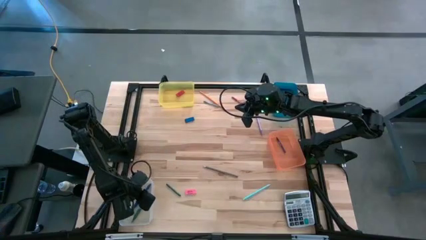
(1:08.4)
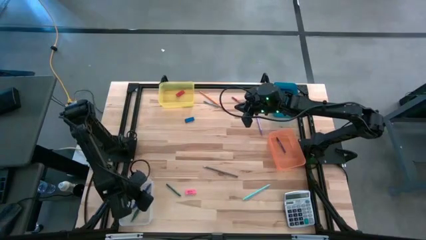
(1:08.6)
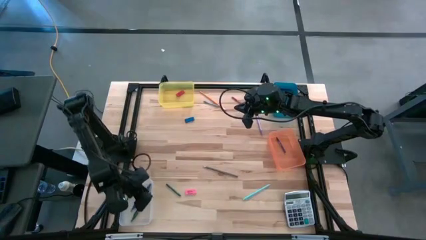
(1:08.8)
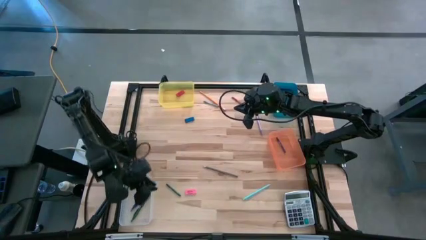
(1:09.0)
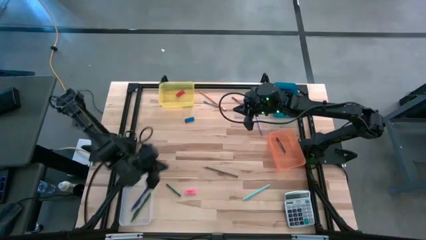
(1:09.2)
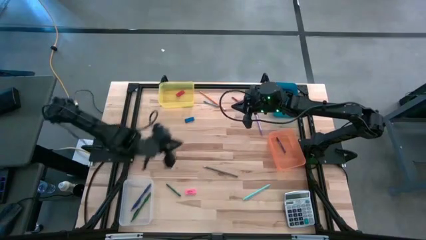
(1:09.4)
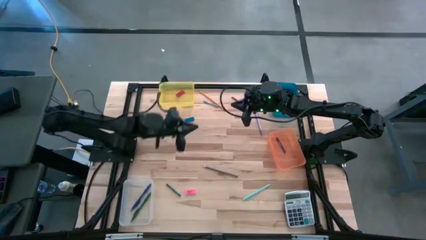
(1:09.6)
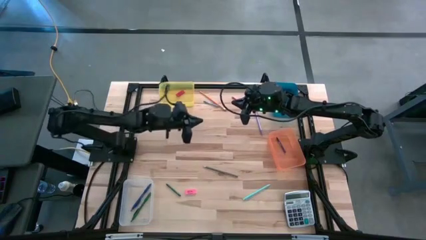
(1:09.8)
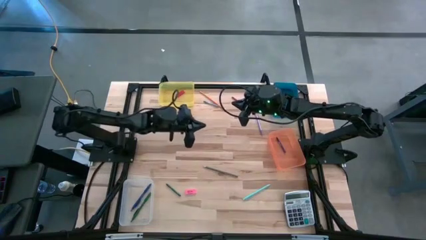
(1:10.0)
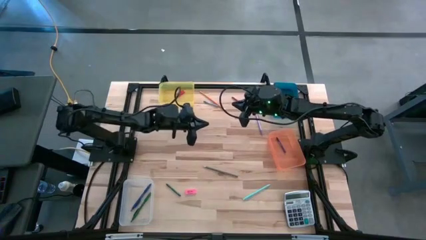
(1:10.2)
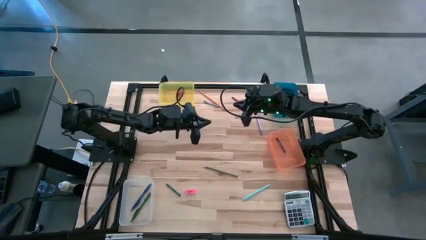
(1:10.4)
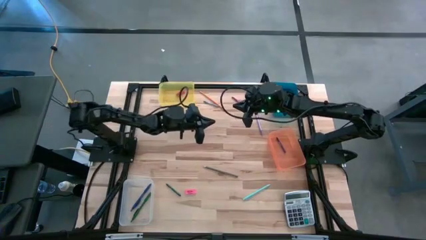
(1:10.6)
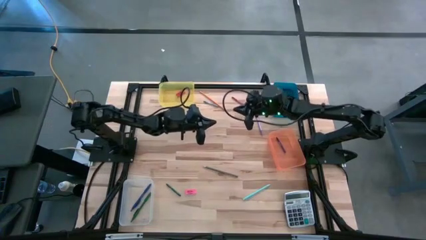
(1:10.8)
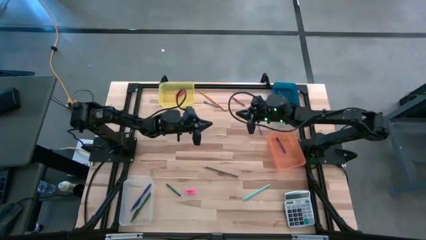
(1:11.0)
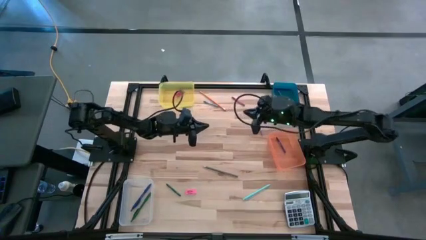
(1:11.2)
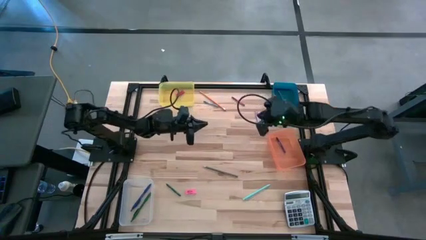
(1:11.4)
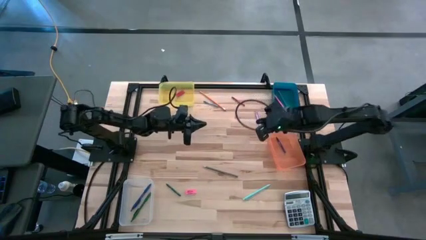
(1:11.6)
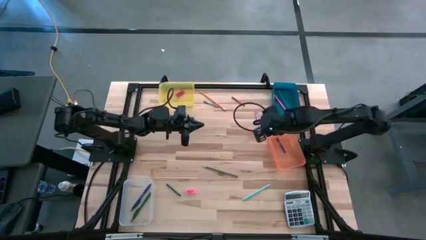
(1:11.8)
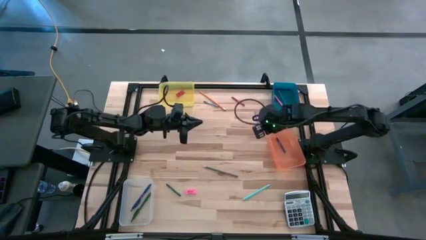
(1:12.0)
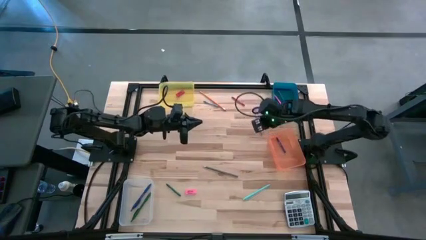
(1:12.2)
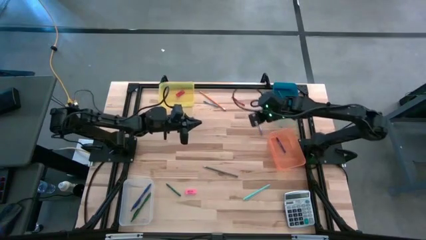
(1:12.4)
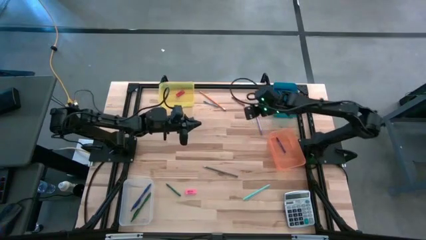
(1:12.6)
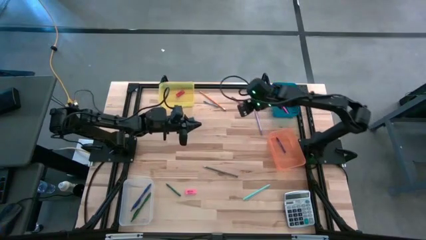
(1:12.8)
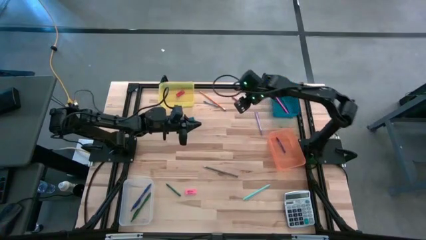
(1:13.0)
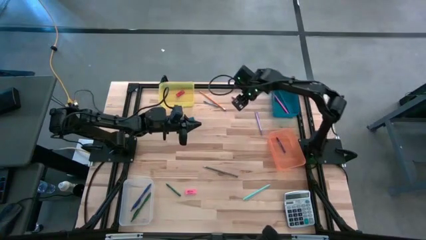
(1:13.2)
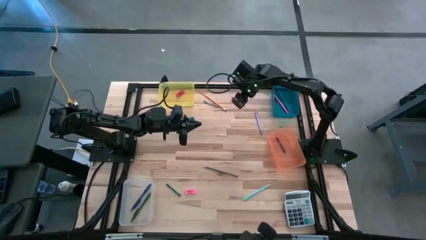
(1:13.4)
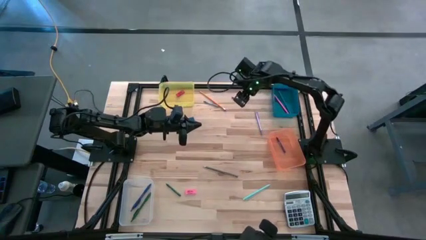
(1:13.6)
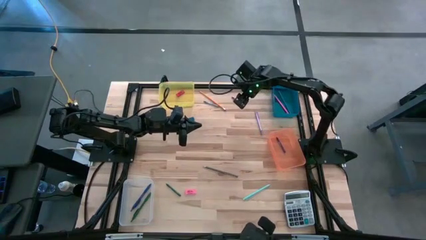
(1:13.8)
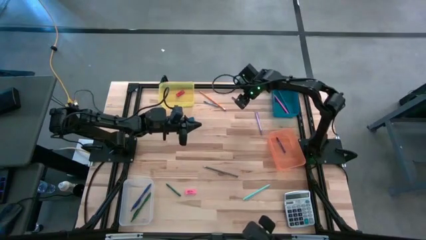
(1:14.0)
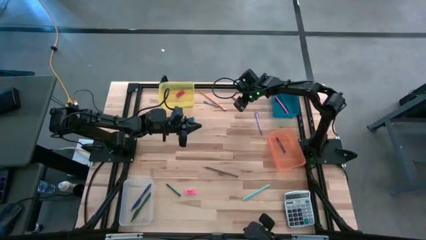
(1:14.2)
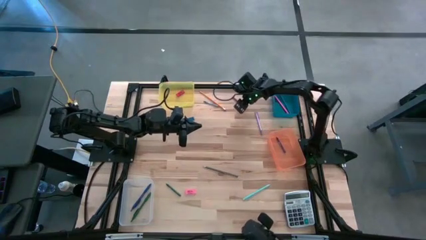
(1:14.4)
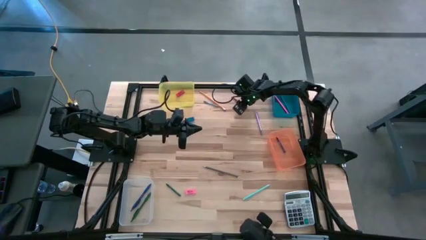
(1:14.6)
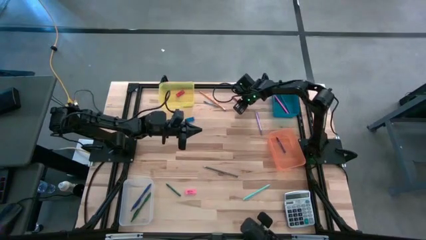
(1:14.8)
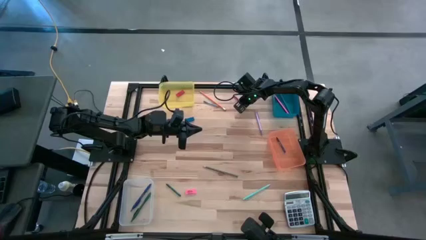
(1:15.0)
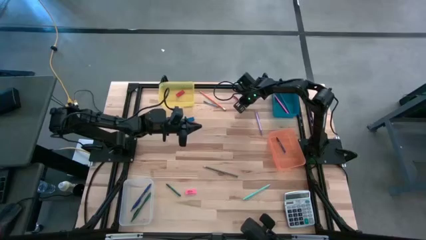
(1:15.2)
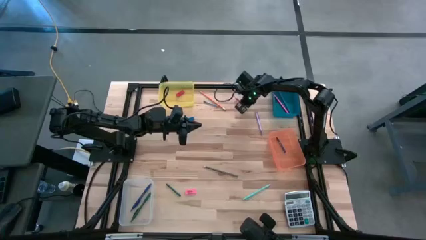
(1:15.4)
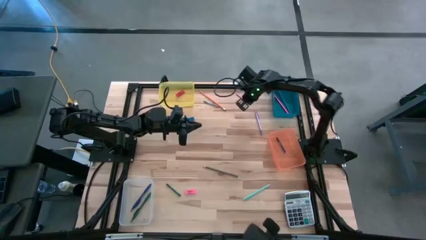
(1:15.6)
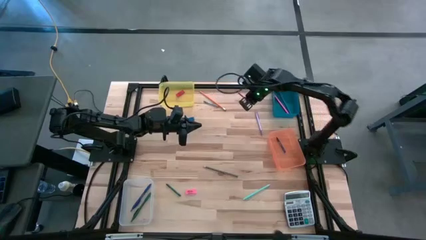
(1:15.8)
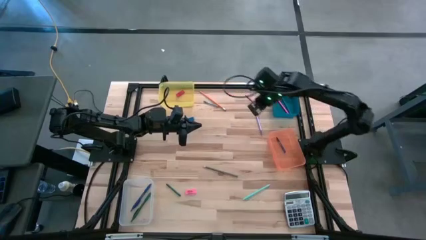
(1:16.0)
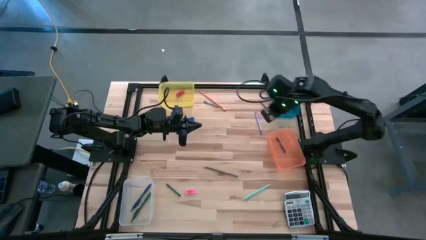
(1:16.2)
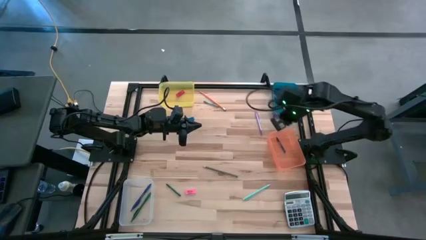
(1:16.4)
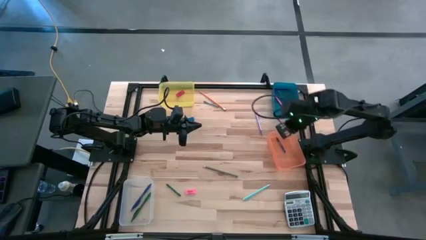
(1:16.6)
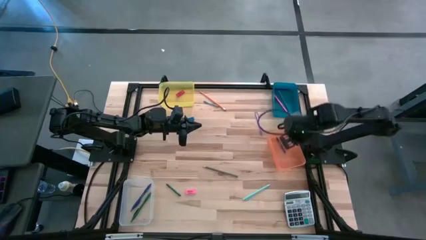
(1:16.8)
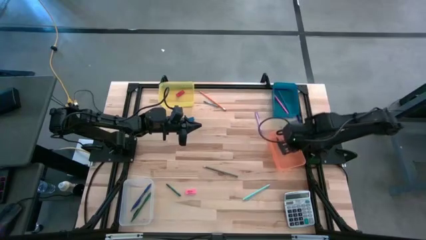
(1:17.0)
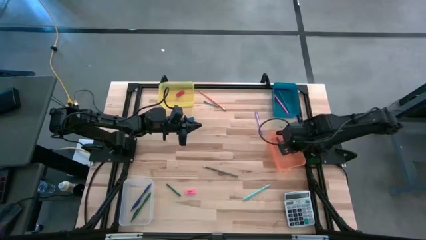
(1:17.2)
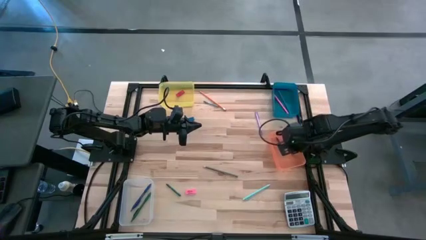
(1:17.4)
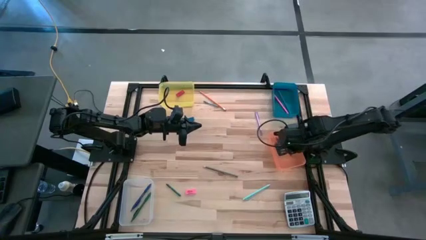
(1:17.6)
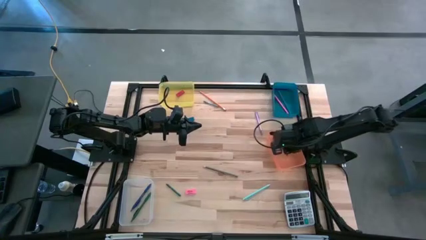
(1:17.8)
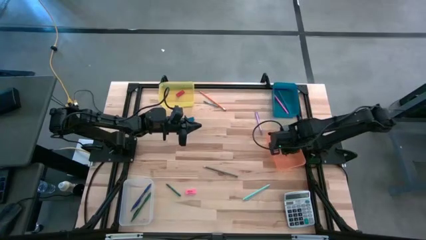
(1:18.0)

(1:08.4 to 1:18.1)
Task: Sort crayons/erasers/pens/pencils in bins
Put the red crayon into the orange bin

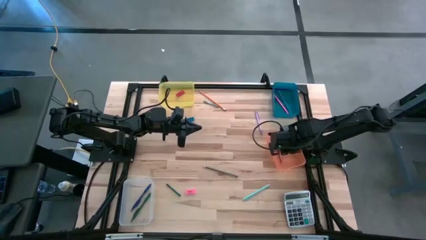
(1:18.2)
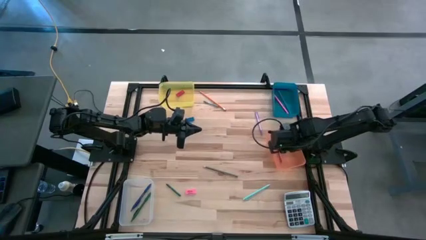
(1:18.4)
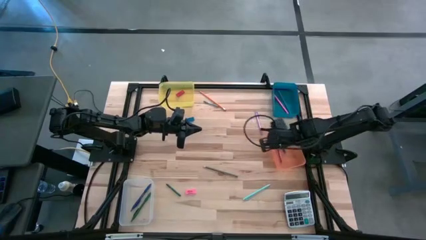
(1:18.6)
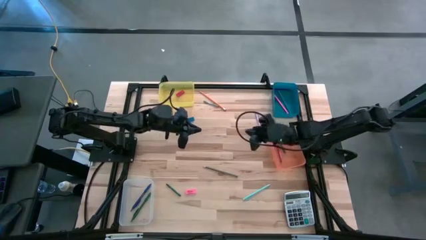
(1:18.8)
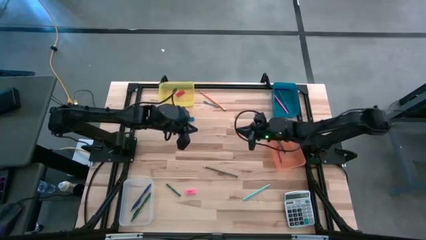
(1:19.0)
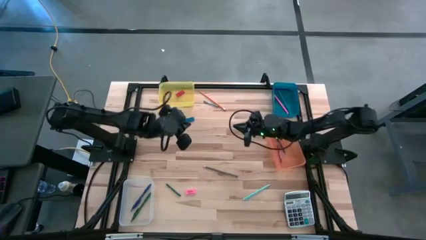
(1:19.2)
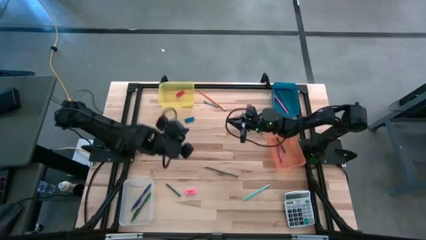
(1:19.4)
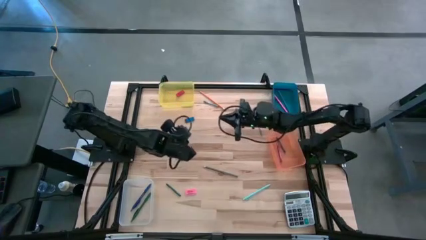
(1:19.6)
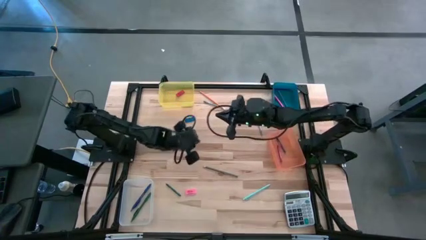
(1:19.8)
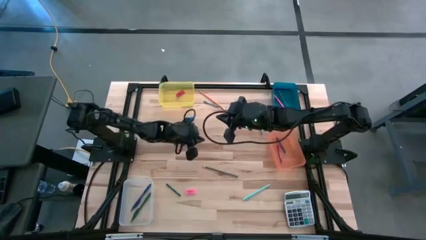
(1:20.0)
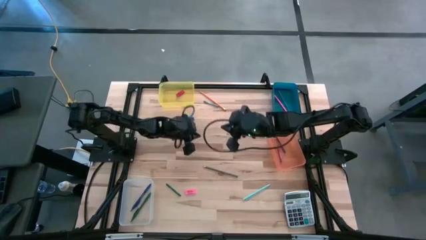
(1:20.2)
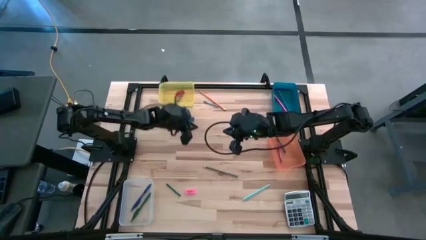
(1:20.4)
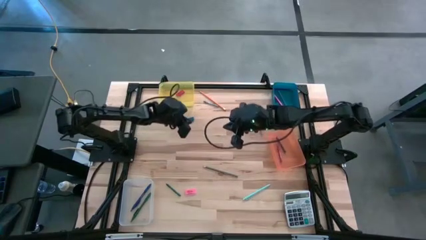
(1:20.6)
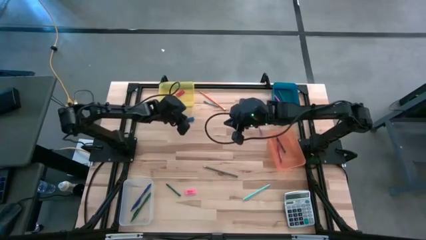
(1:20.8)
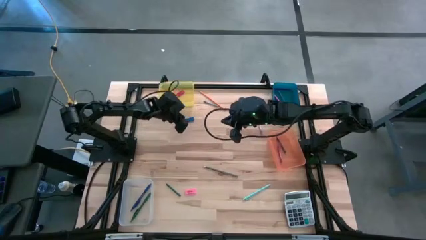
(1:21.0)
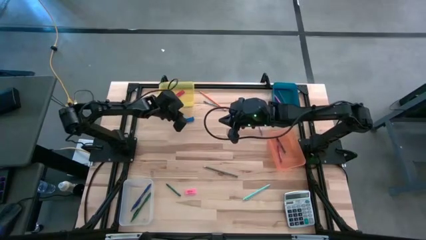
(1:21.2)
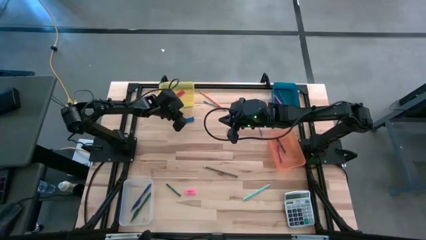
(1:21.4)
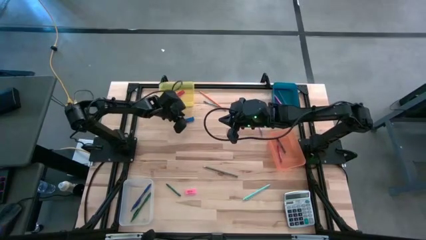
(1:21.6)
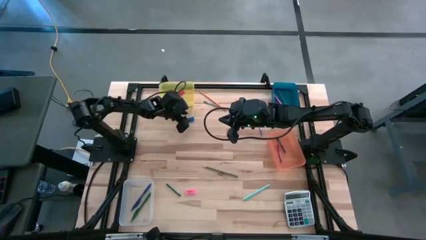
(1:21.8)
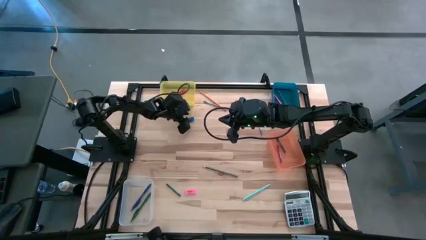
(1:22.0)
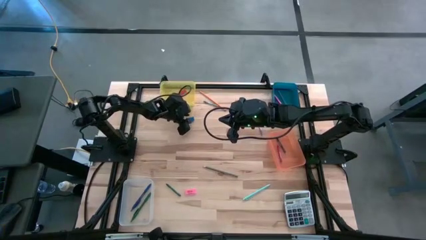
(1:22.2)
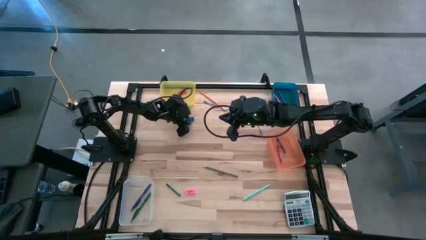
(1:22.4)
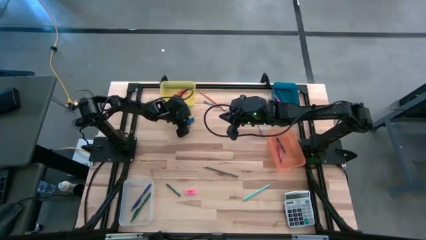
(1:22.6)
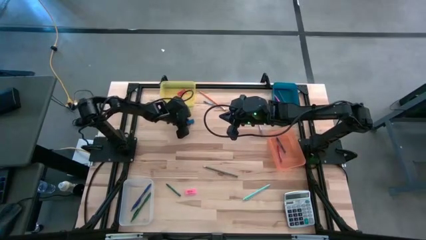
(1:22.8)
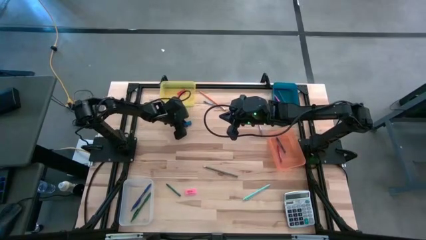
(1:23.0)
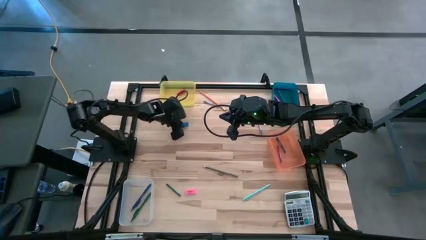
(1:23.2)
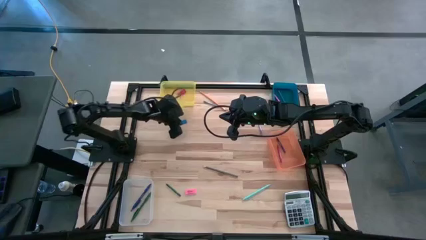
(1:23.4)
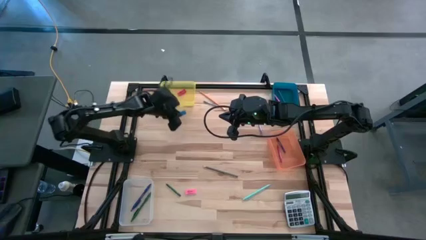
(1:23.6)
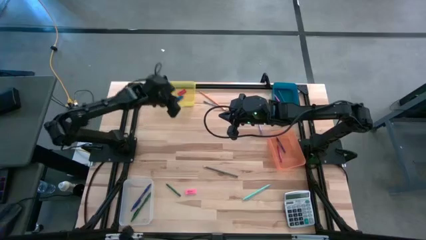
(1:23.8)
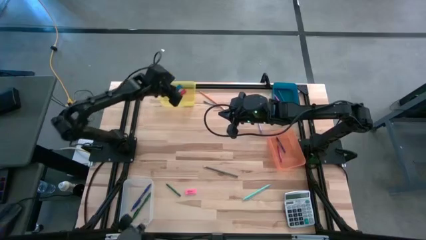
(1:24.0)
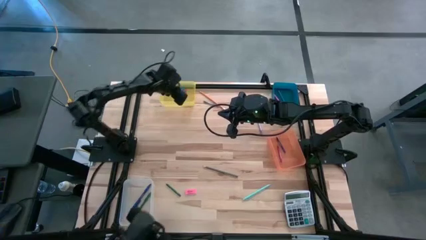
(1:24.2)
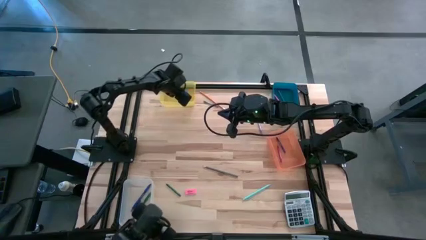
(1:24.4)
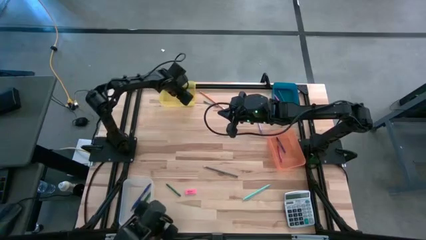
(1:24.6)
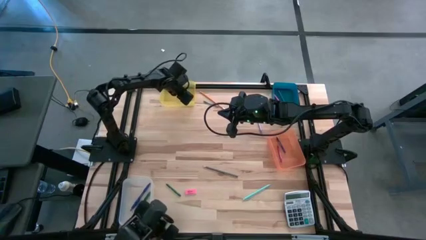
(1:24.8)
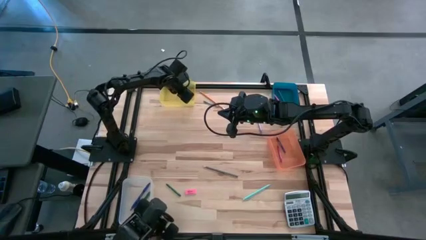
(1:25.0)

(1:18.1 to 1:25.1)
Put the blue eraser into the yellow bin

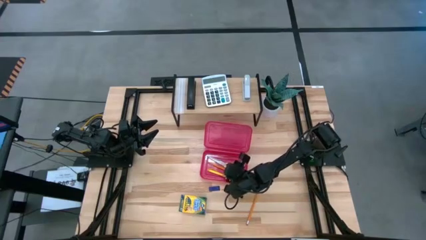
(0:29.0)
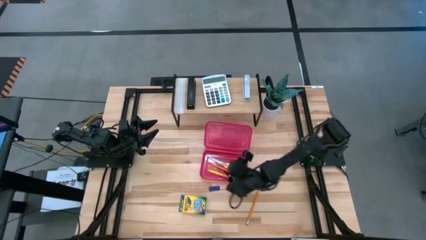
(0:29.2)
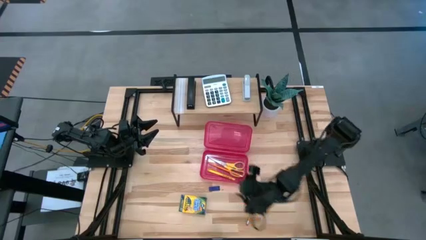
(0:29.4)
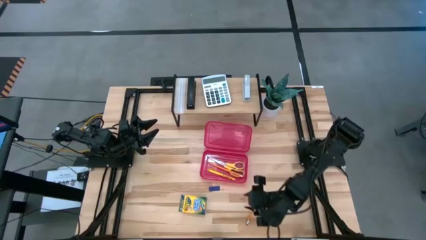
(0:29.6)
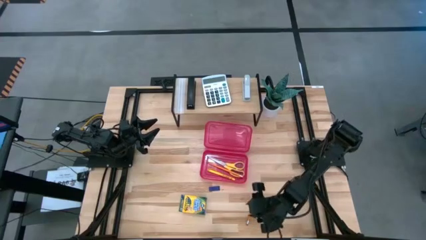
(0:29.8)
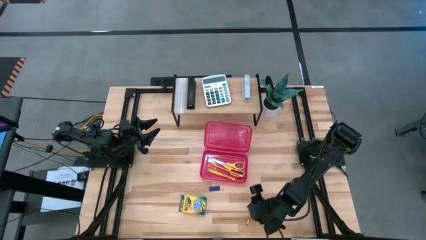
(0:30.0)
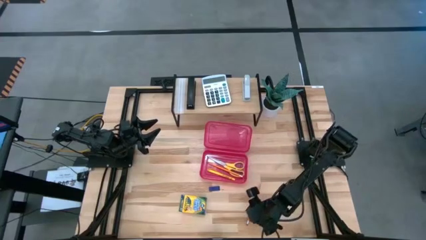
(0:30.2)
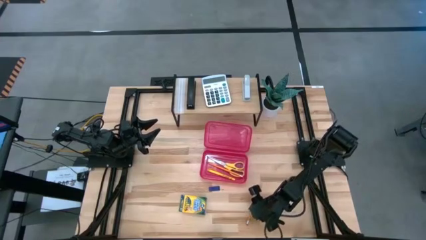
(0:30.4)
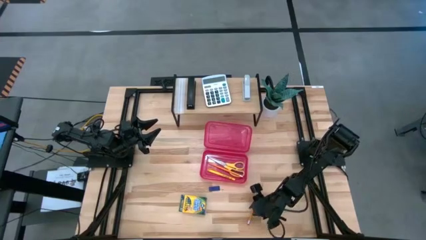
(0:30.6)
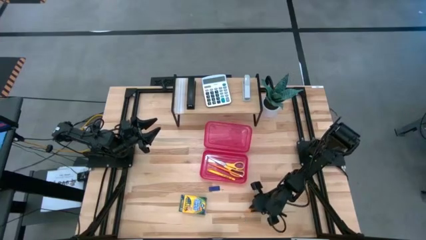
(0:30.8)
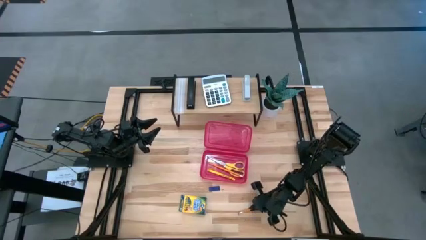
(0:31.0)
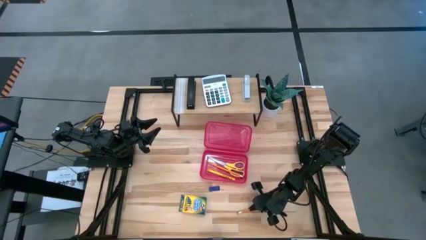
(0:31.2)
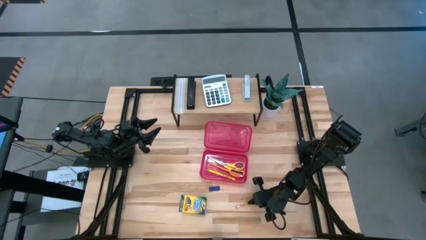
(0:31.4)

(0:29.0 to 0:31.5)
Task: Pack school essentials
Put the orange pencil into the red supply box
